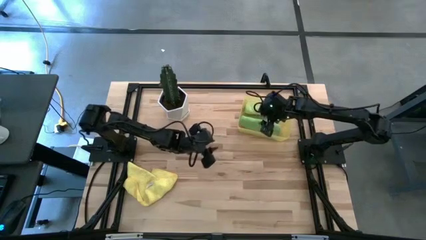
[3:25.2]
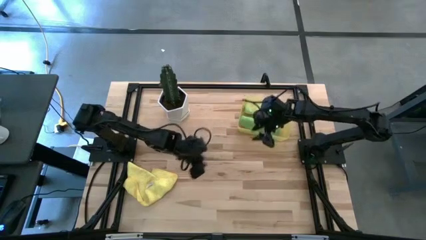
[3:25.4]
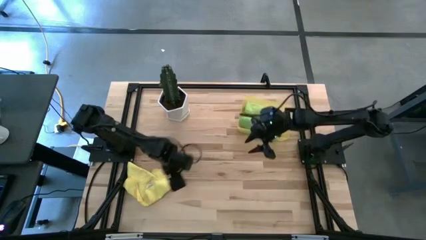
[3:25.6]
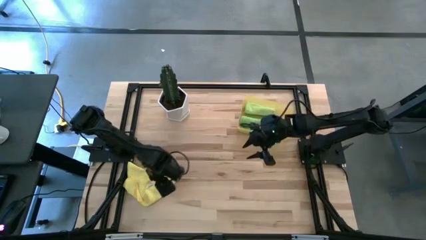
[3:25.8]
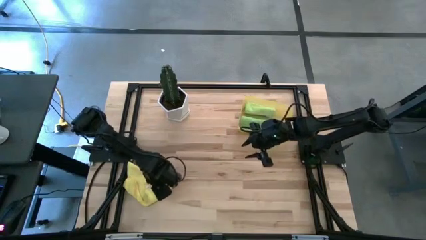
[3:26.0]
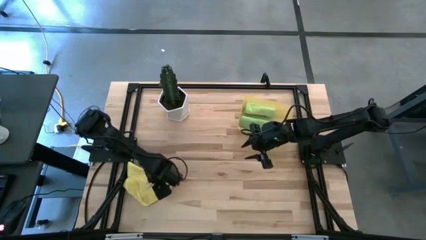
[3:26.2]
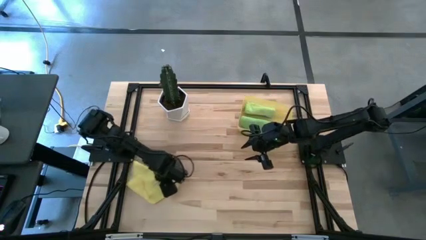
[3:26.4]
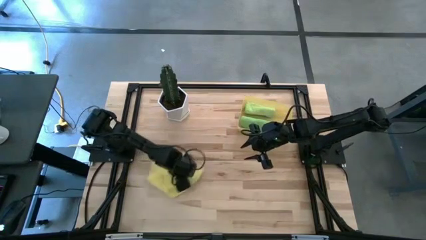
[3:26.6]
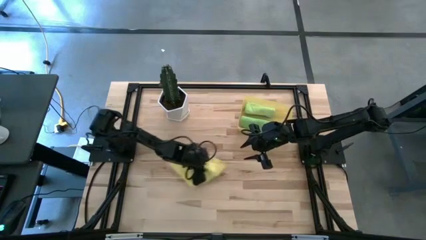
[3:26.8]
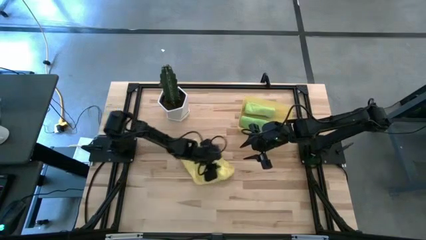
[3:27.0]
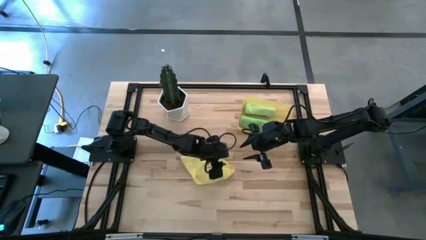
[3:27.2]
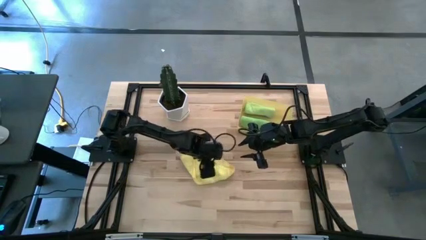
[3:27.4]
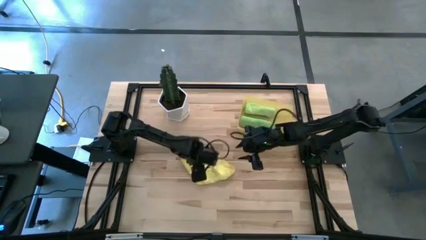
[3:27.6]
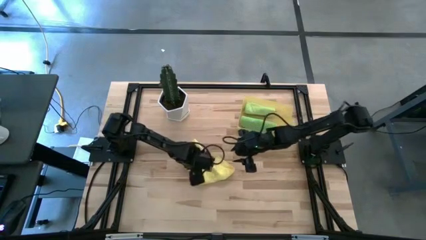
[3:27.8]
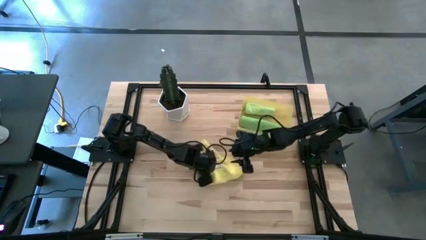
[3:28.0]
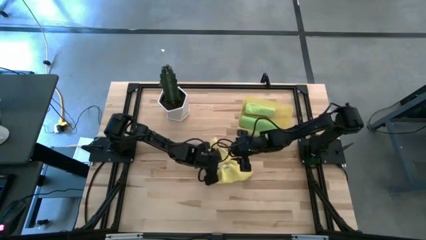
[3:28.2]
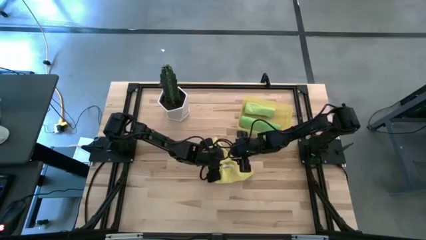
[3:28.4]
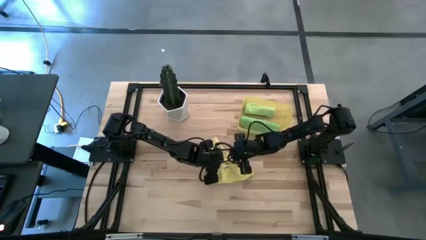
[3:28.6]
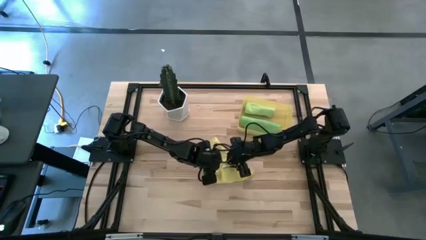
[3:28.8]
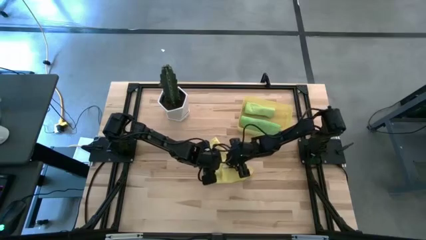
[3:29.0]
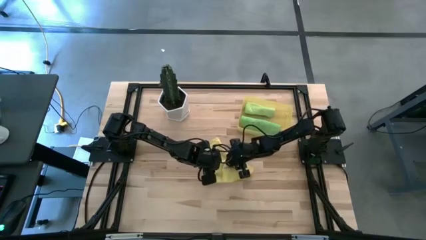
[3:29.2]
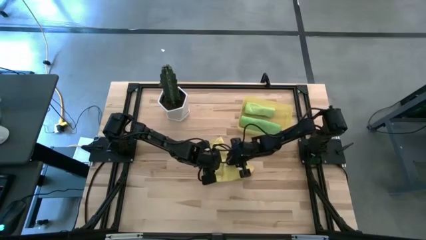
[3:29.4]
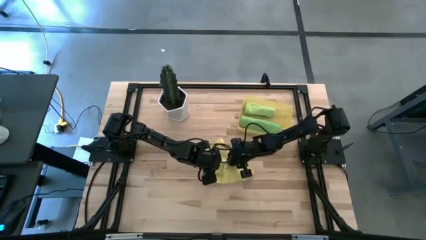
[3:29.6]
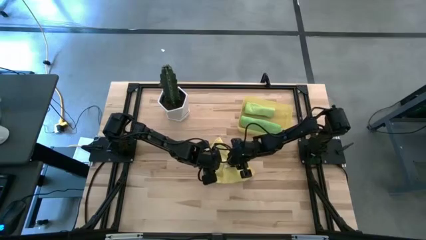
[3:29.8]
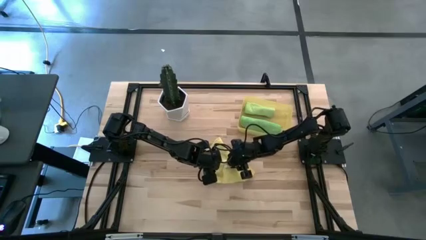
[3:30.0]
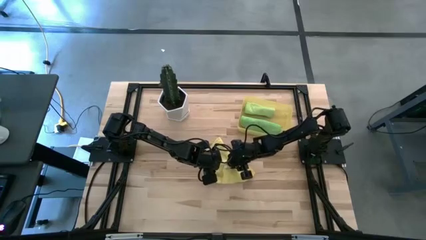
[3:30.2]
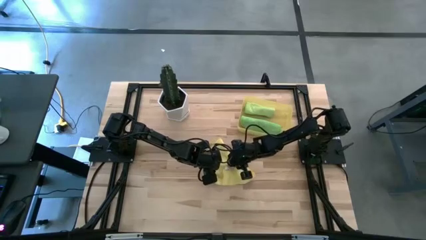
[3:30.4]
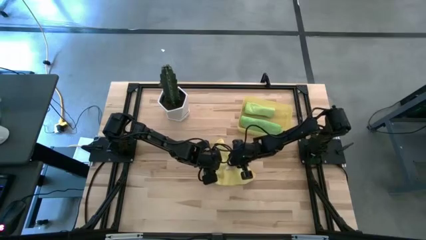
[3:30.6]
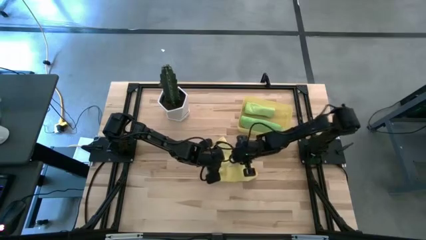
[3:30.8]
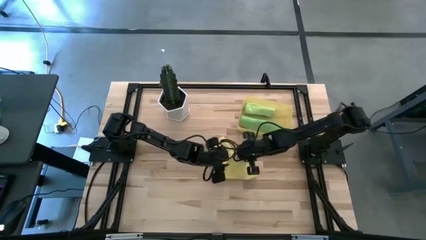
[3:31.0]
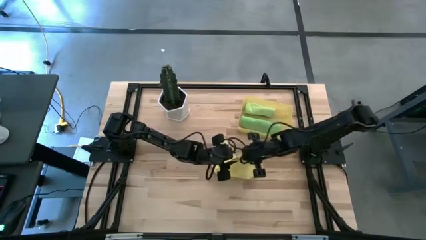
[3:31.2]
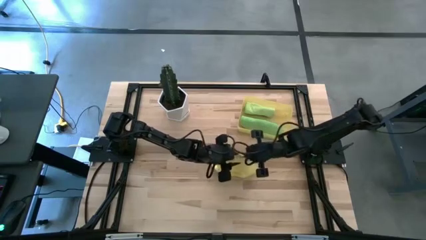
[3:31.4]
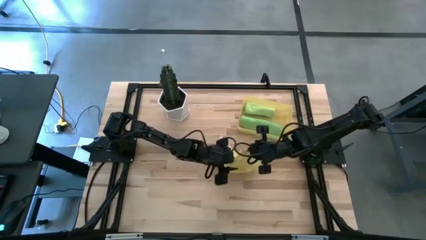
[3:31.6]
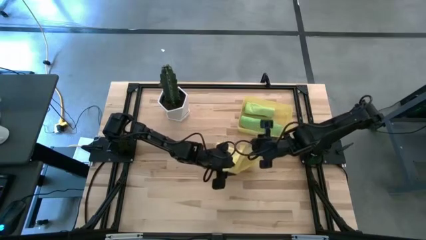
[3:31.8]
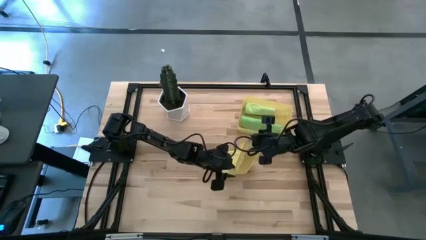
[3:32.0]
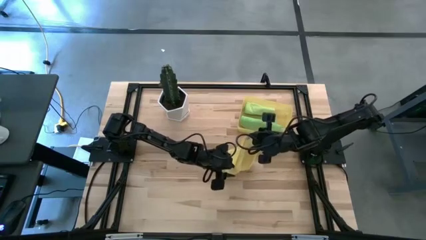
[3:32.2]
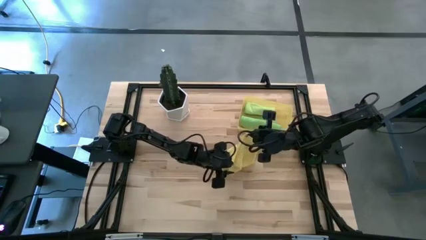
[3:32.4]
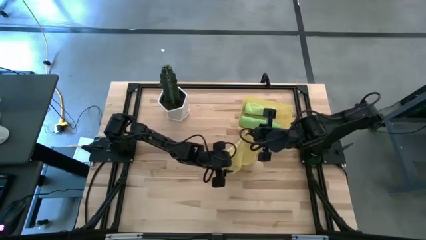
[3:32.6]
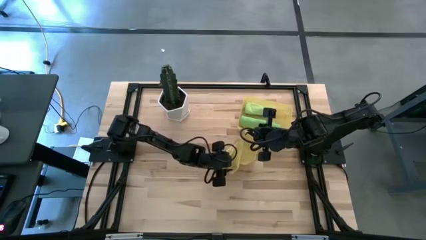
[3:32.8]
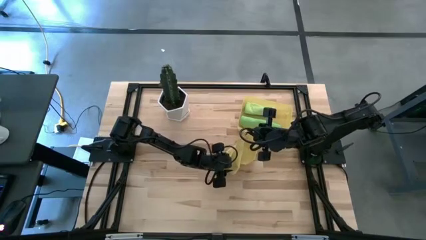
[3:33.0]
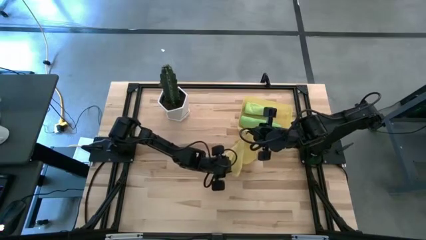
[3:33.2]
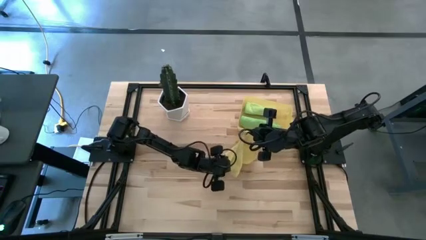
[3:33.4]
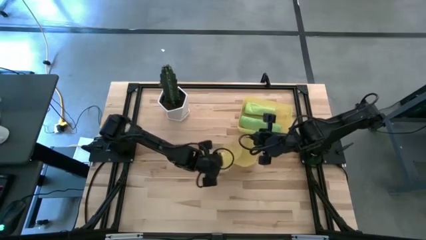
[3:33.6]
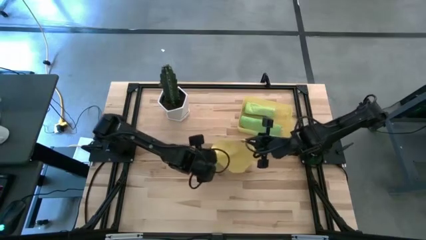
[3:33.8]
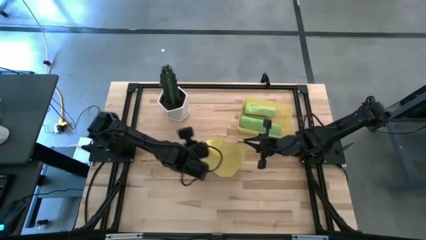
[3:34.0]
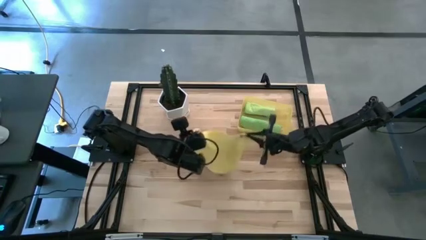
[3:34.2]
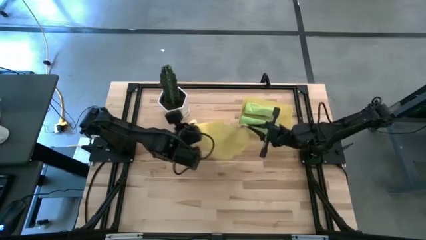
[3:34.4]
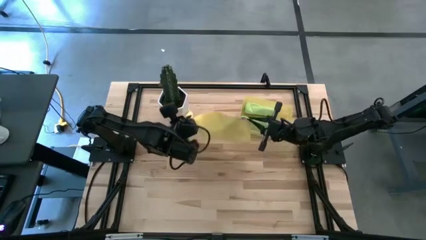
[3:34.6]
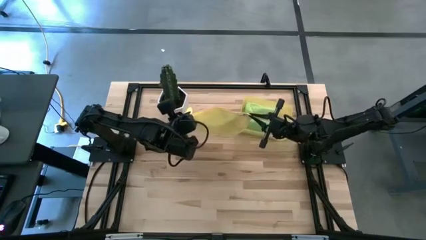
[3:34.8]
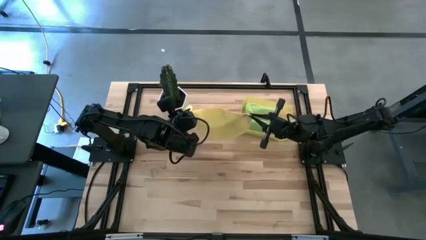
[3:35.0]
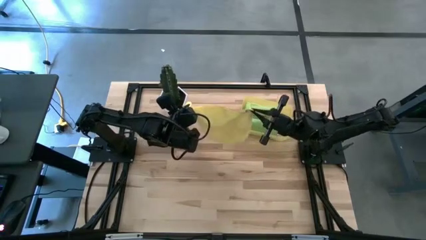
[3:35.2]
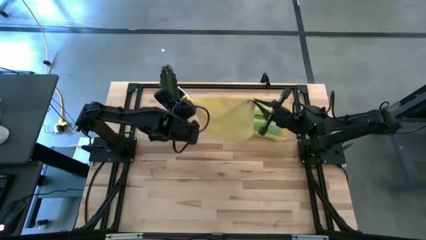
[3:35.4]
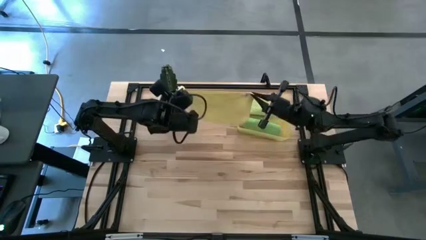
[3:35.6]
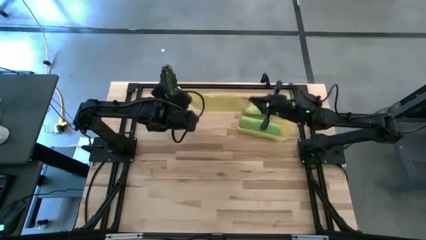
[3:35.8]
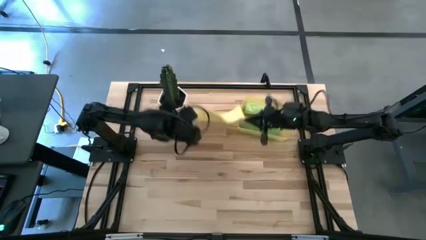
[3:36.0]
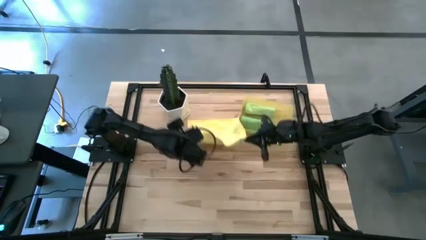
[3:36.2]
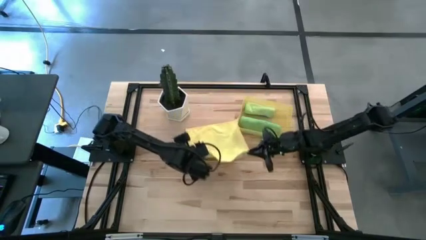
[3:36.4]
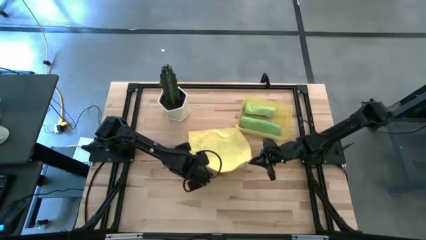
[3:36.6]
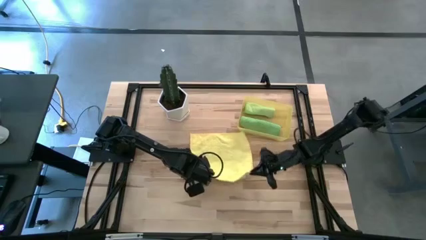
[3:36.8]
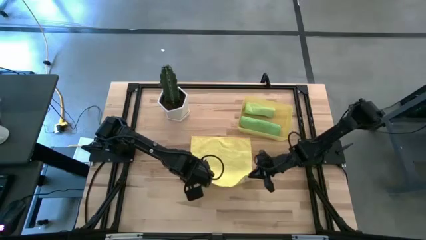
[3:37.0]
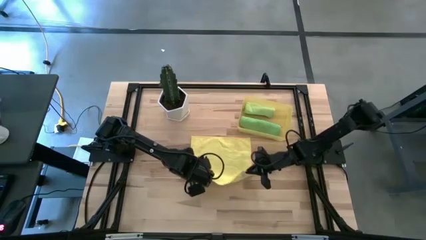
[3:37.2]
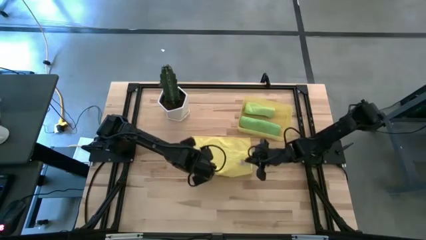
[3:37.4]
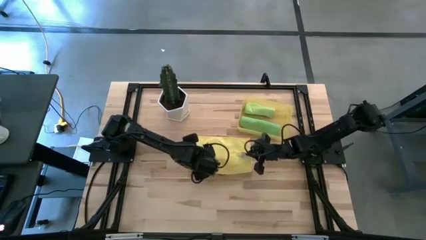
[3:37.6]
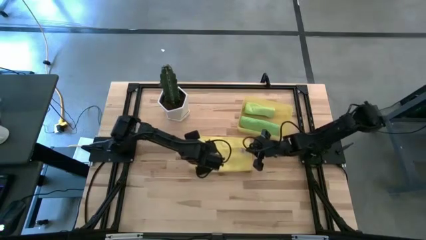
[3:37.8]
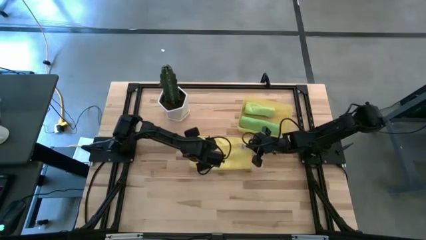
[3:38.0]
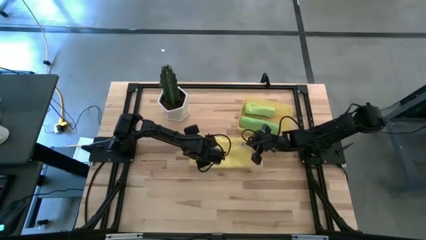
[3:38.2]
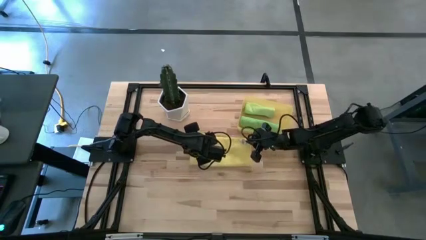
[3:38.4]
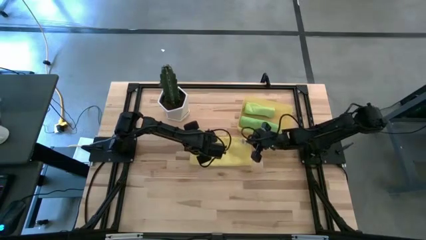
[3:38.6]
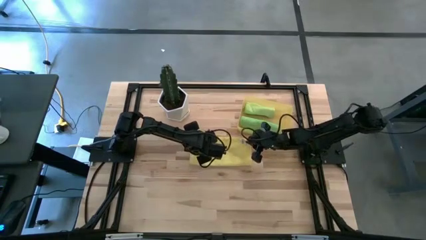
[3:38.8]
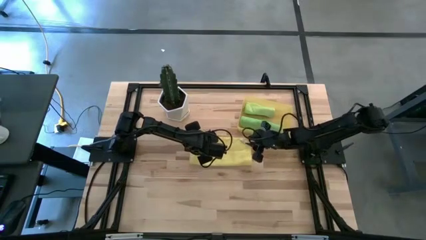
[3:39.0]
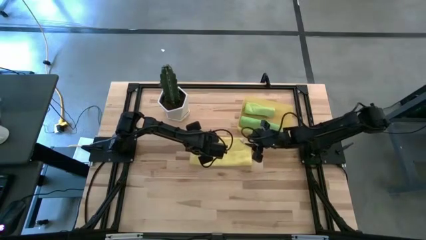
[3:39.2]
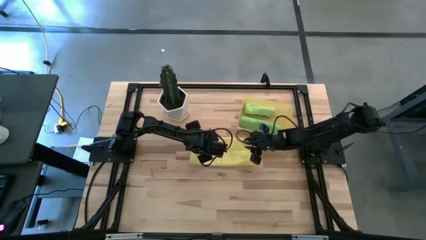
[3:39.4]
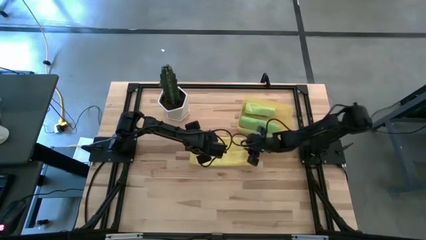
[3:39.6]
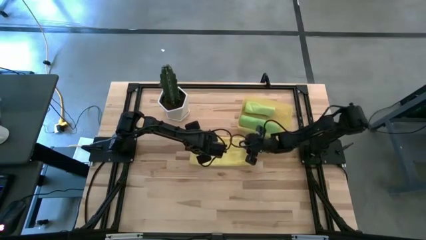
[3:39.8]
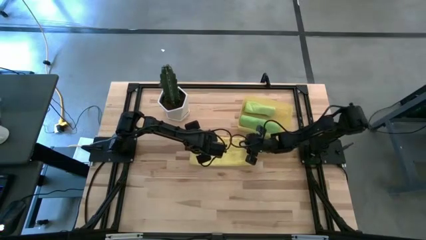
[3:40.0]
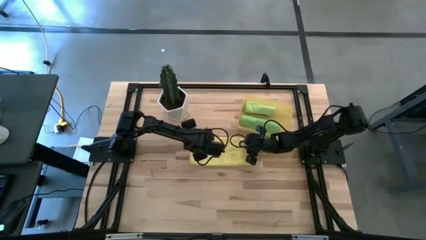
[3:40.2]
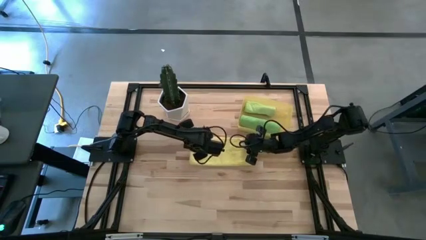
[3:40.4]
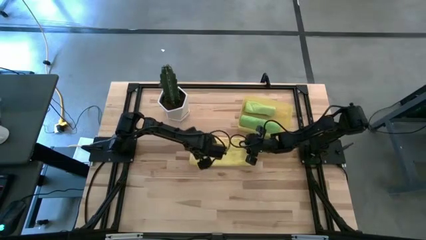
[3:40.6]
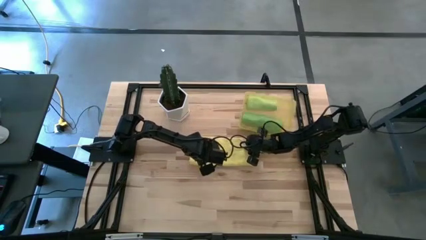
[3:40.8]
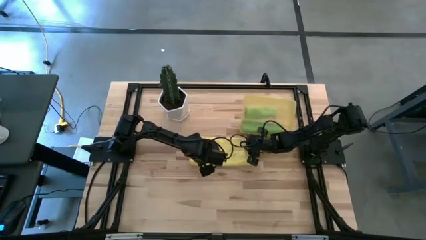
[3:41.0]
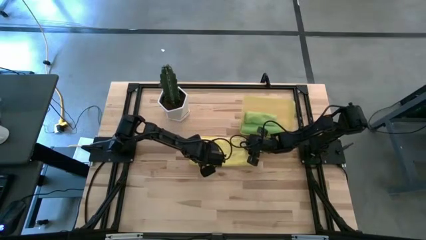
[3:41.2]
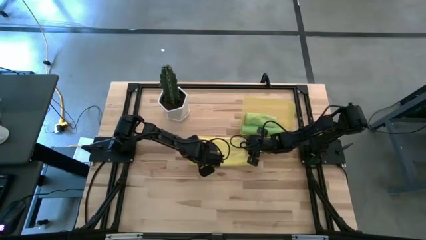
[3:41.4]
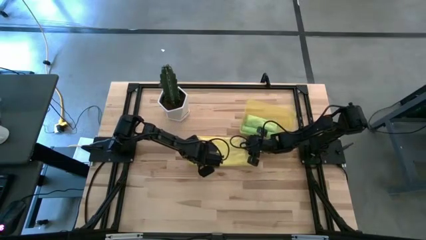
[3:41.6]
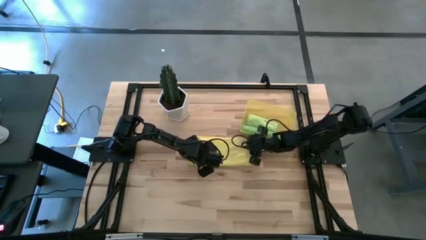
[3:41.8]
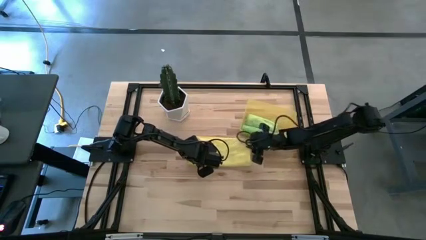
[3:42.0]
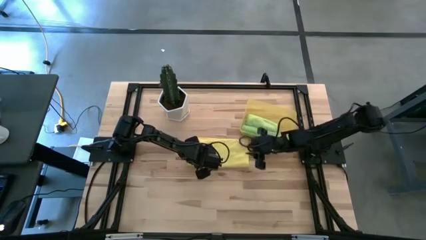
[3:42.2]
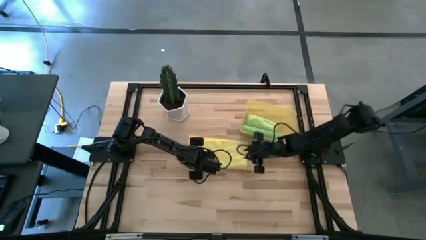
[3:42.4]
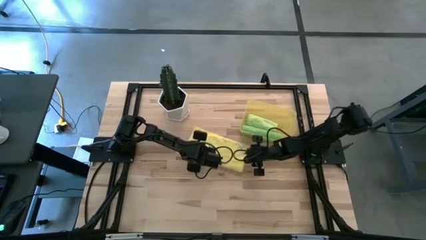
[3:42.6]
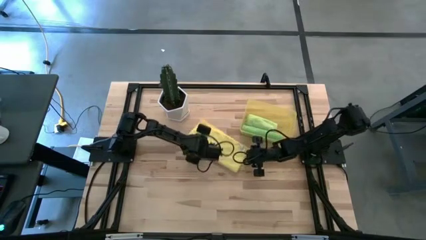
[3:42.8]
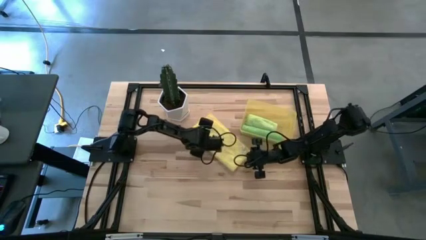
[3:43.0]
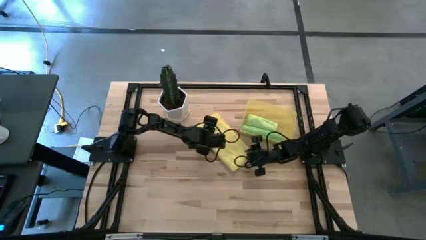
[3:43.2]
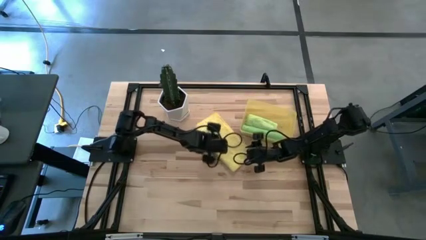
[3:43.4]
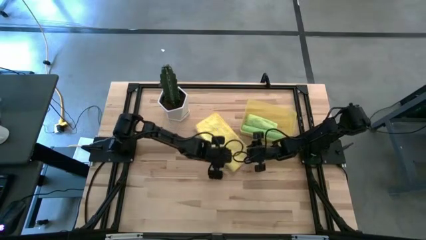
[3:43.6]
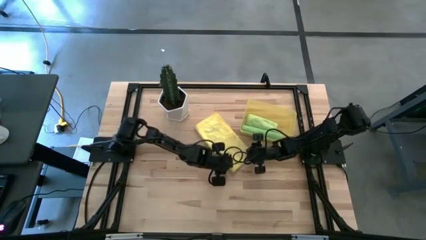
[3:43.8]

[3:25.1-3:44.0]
Task: Roll microfiber towels into tight, uniform cylinder then place into a basket
Fold the yellow microfiber cloth
